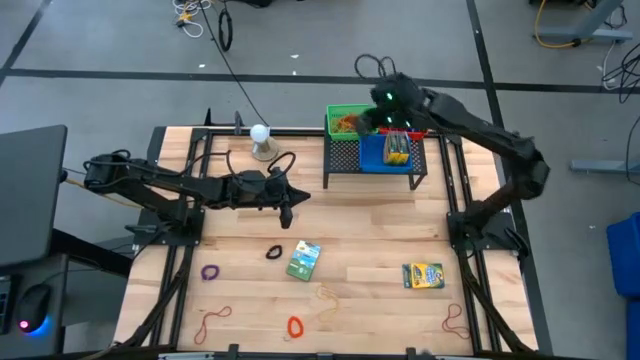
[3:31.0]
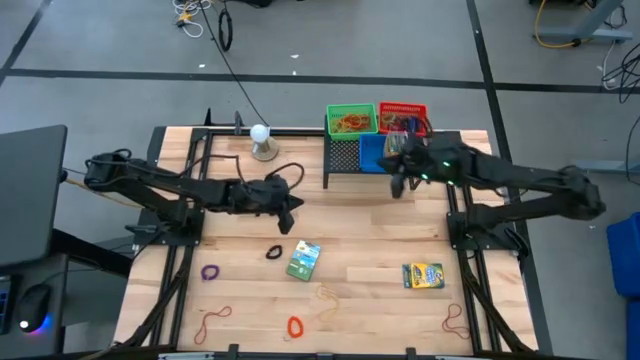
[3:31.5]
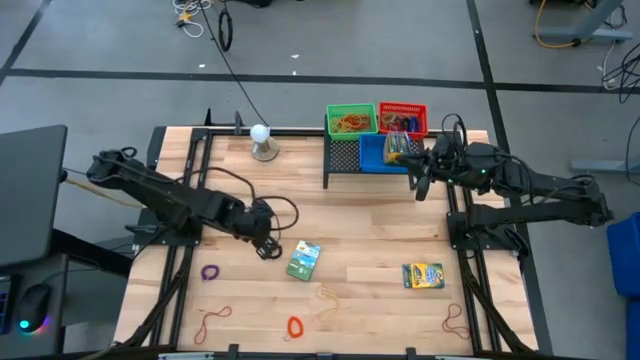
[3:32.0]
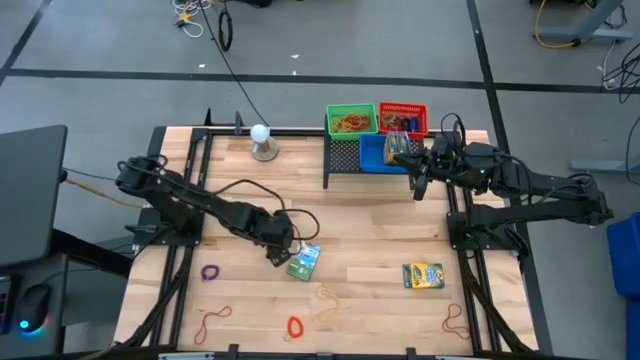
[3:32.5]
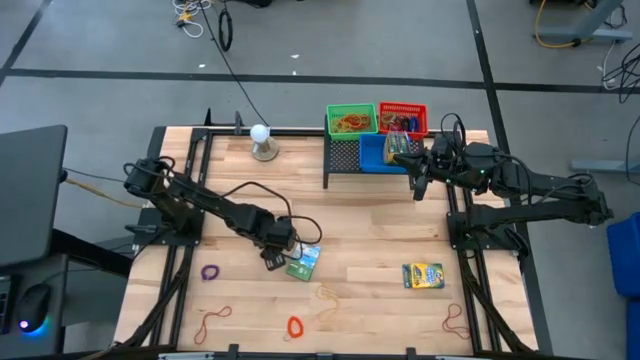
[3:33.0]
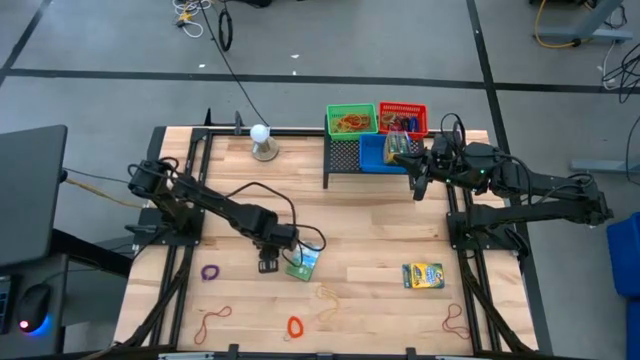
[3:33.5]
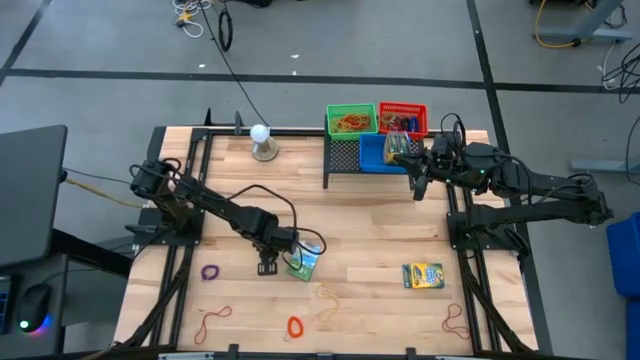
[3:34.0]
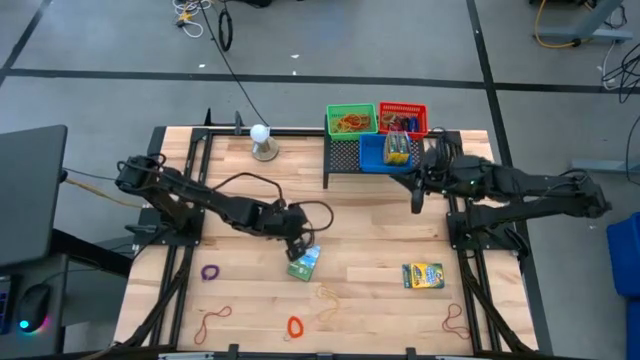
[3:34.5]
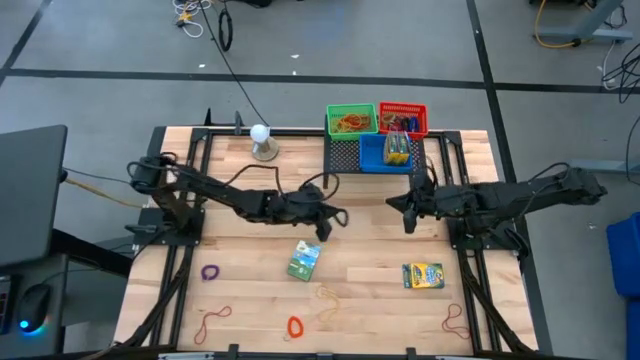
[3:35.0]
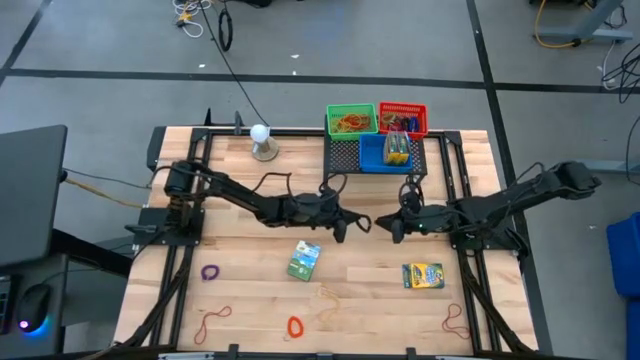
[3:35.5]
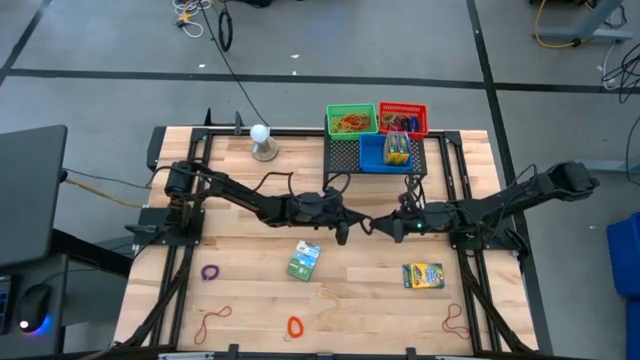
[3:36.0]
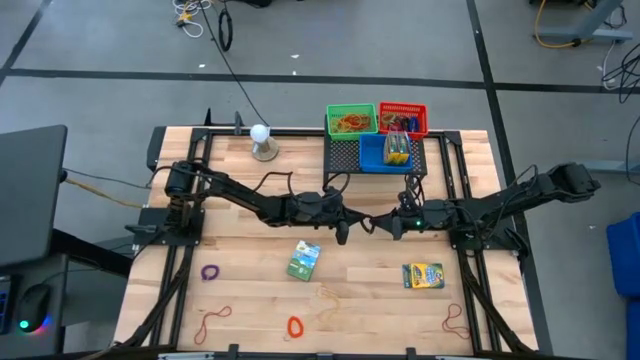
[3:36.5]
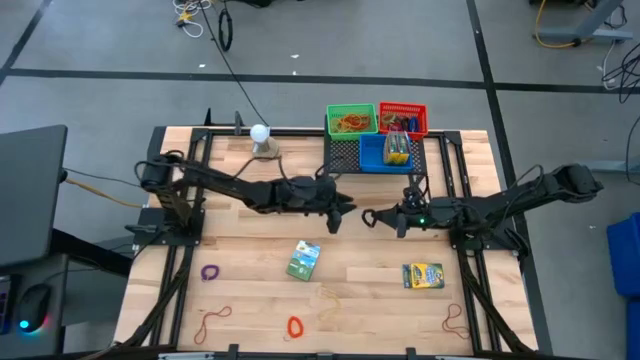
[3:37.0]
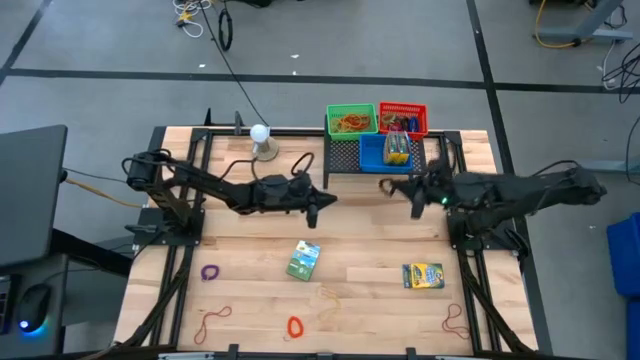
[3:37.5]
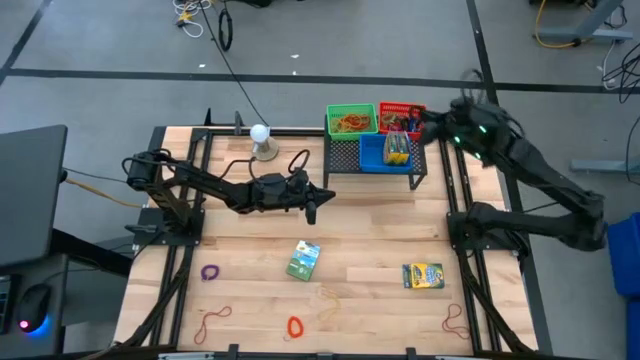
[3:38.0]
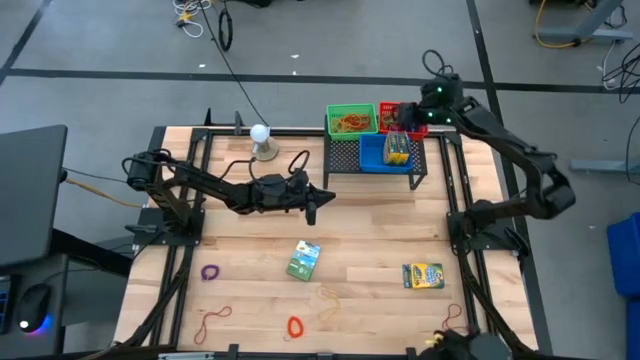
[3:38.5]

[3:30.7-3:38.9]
Task: Pick & Place Office Desk Supplies
Put the black spiral keychain into the red bin

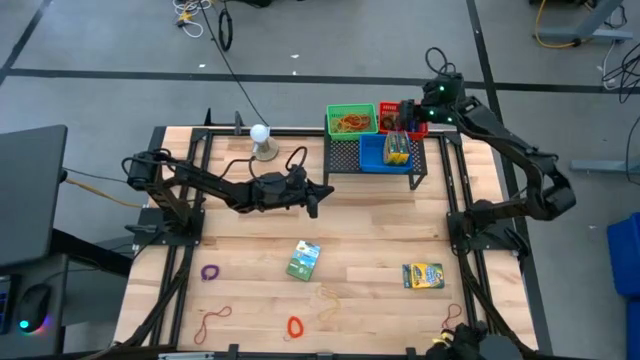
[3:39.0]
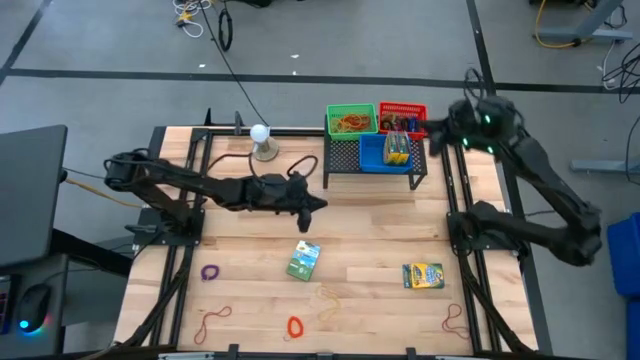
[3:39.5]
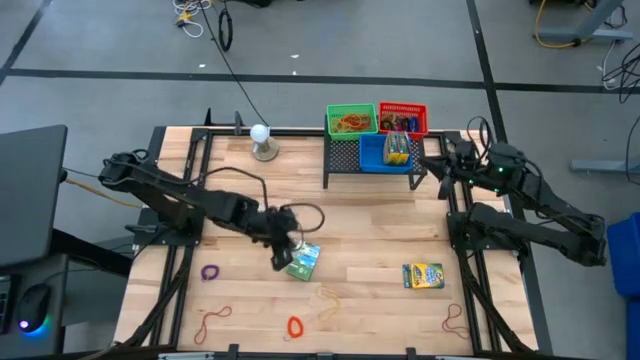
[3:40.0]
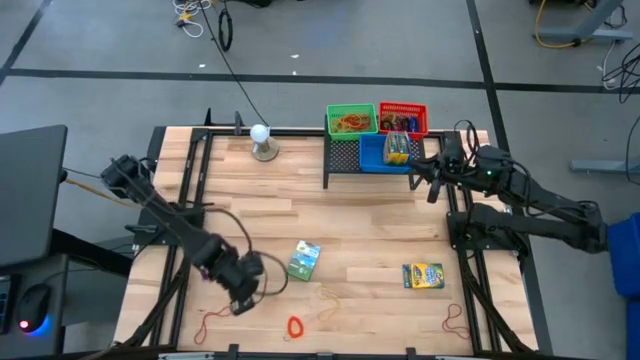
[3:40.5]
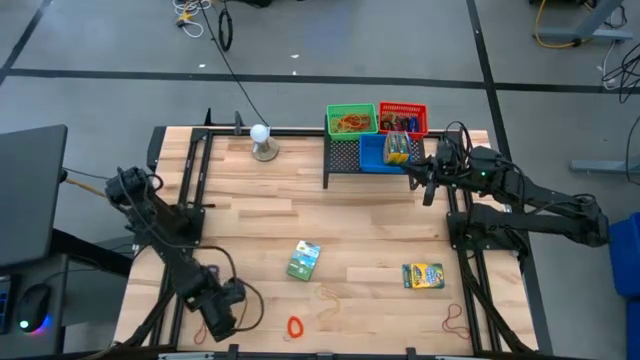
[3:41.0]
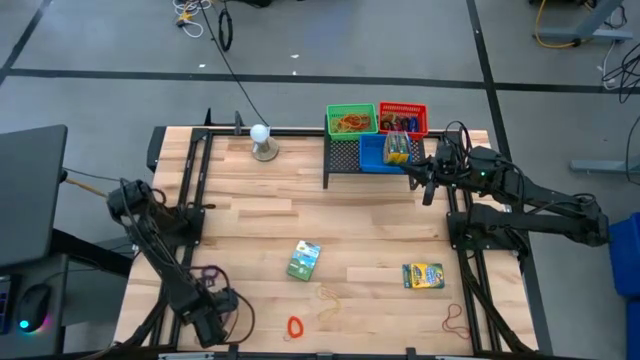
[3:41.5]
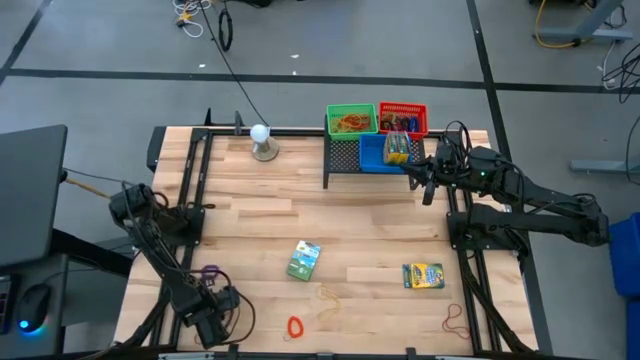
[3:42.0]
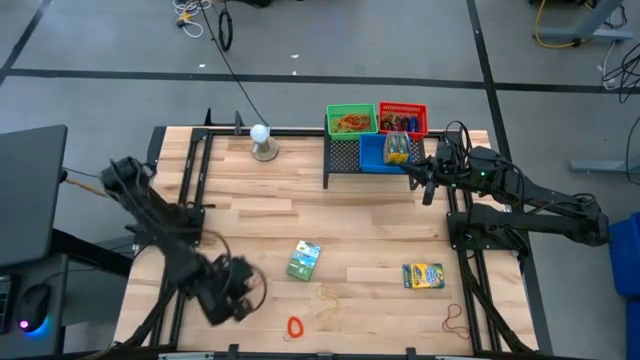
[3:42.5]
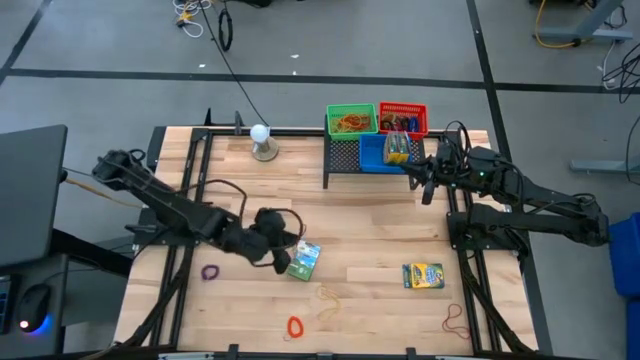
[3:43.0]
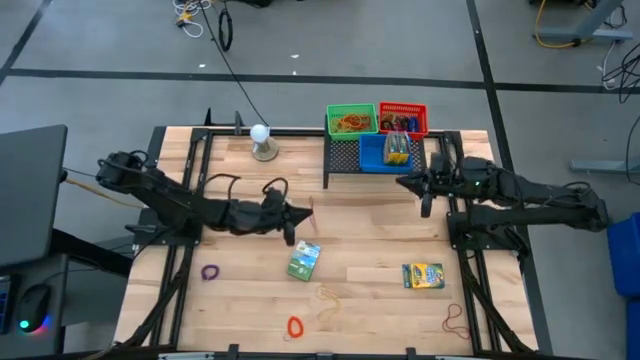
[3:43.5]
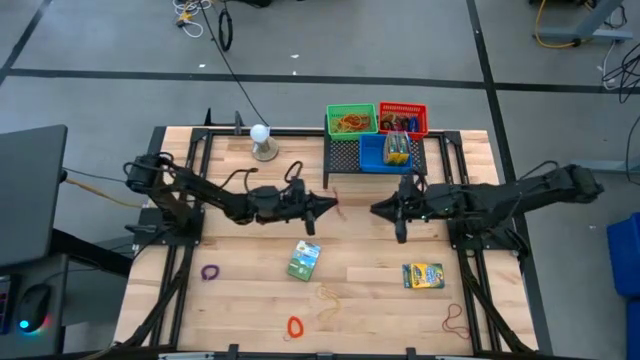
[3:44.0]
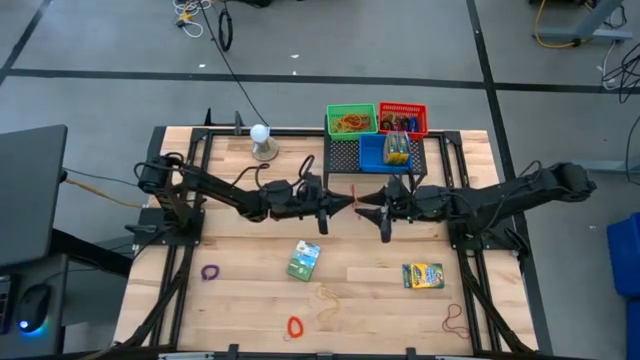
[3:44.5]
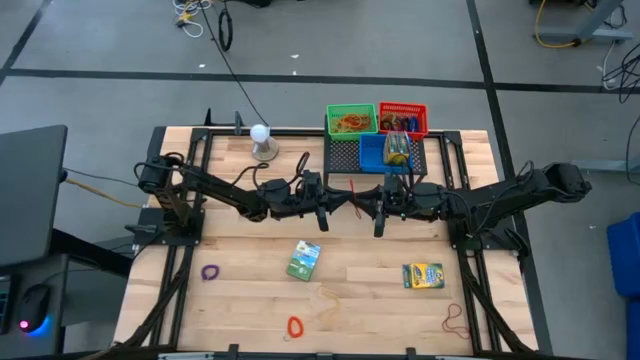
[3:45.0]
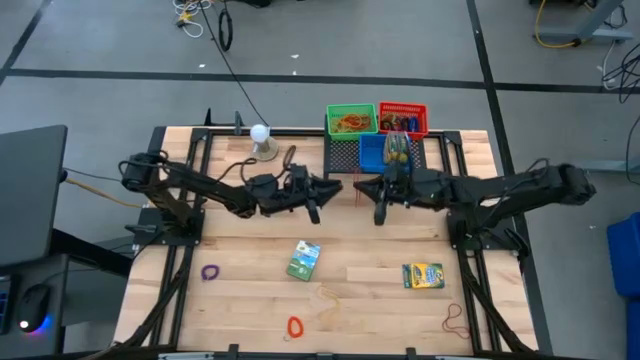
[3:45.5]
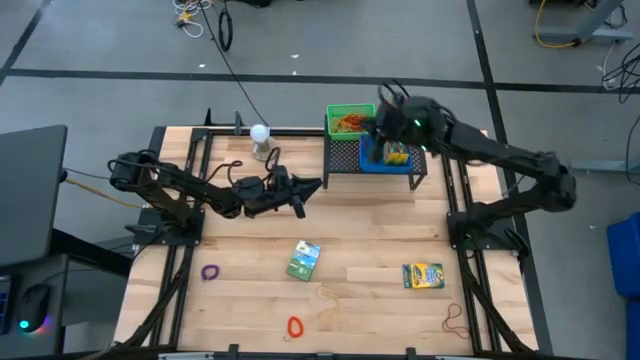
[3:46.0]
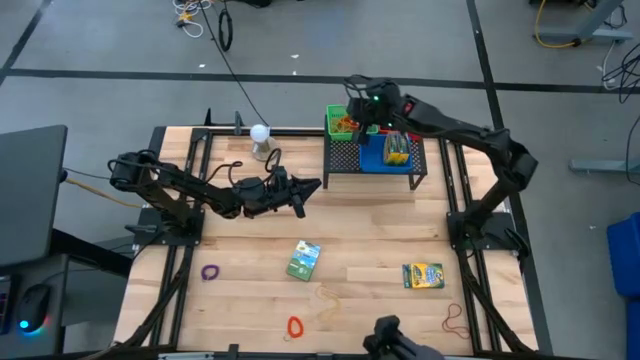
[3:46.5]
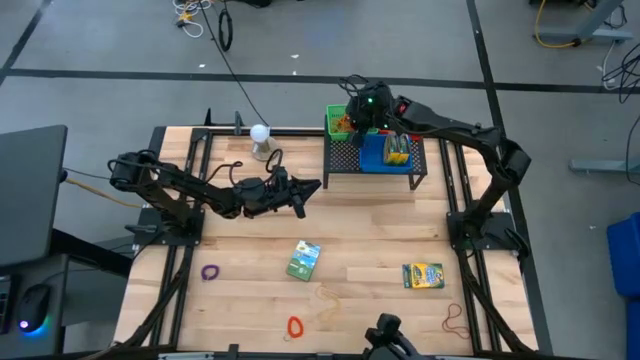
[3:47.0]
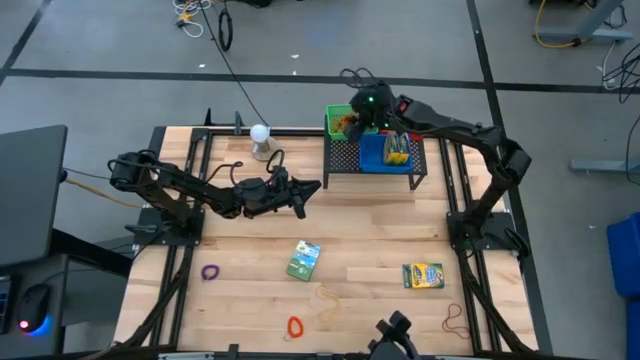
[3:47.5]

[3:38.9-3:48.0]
Put the red rubber band into the green bin

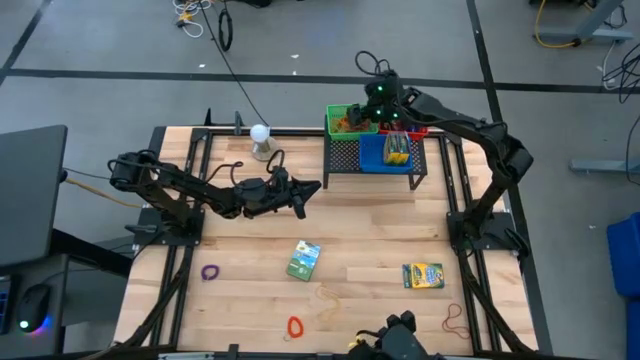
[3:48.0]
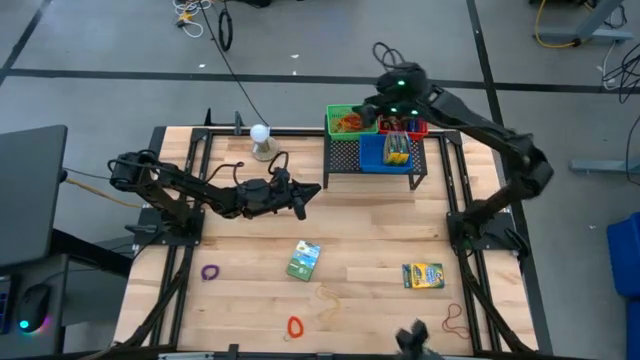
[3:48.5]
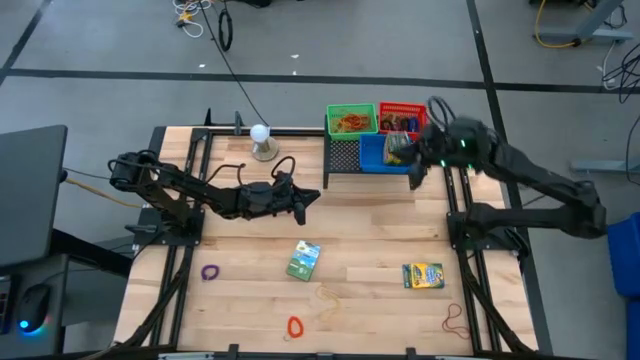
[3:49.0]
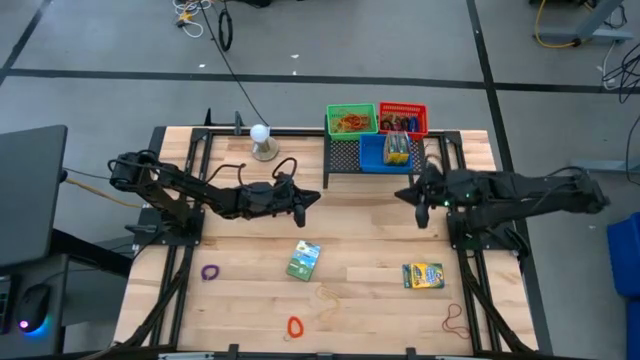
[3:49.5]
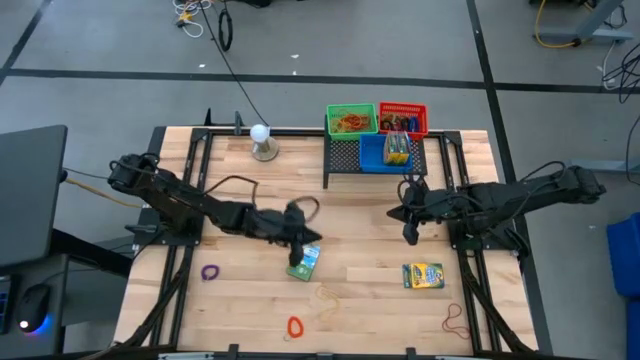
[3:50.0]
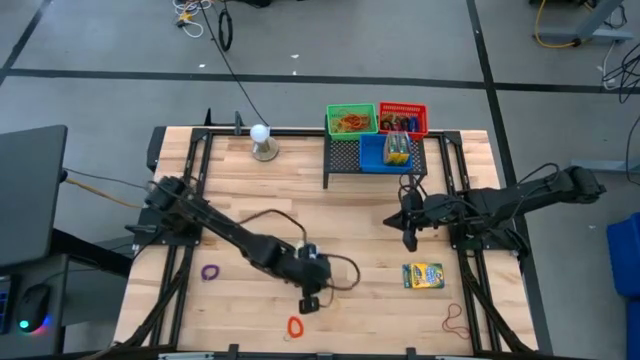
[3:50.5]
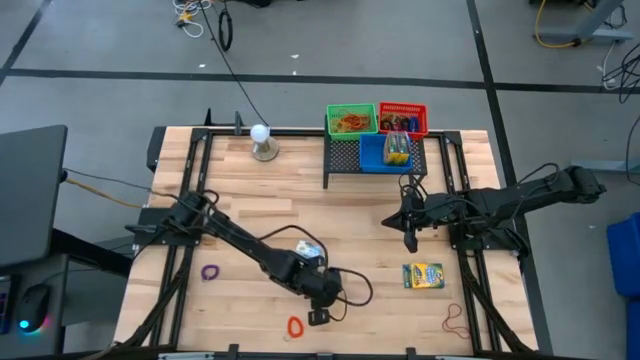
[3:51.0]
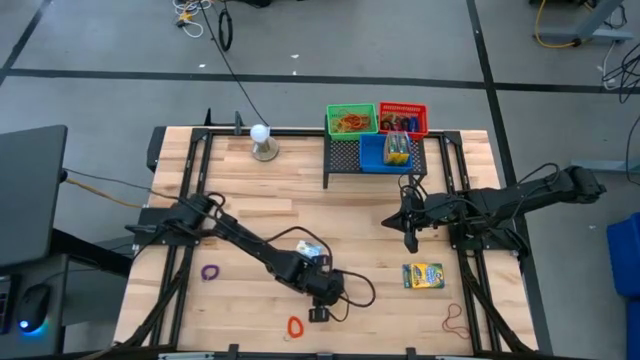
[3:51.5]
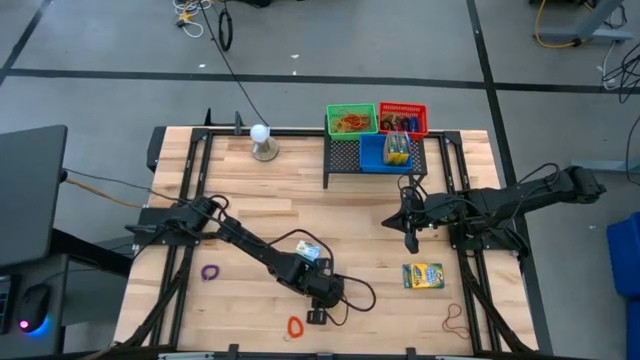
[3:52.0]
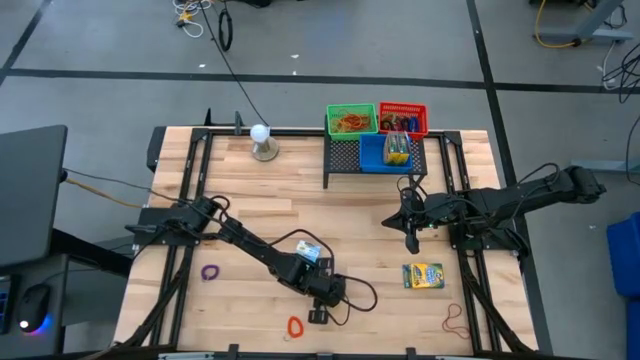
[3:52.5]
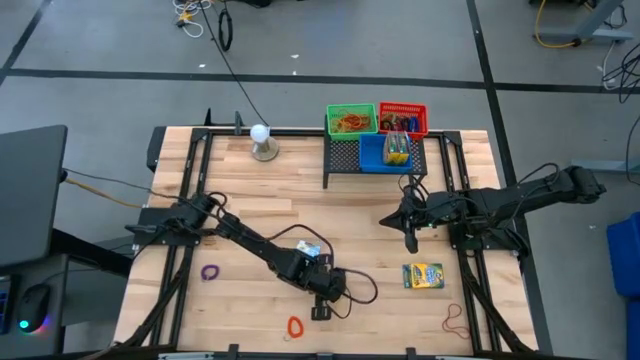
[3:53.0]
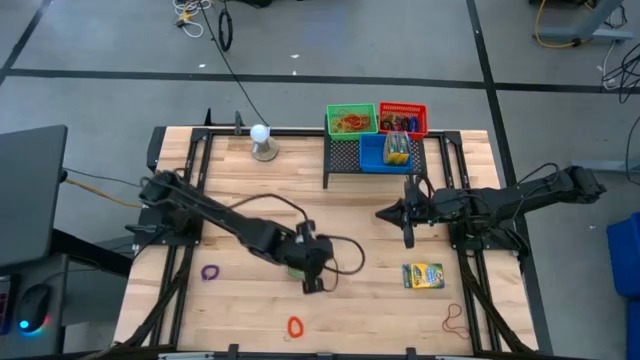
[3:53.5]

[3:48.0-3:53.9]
Put the yellow rubber band into the green bin
